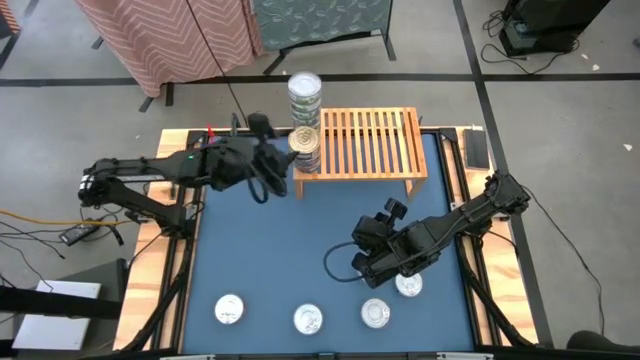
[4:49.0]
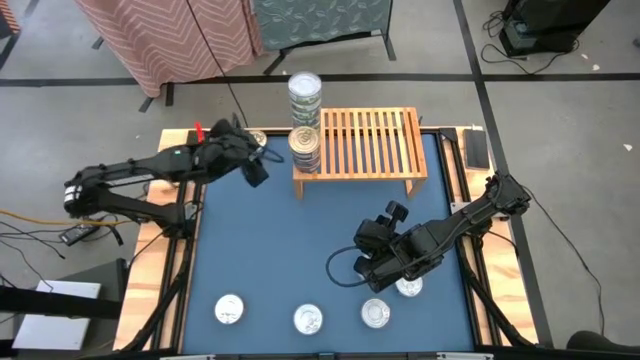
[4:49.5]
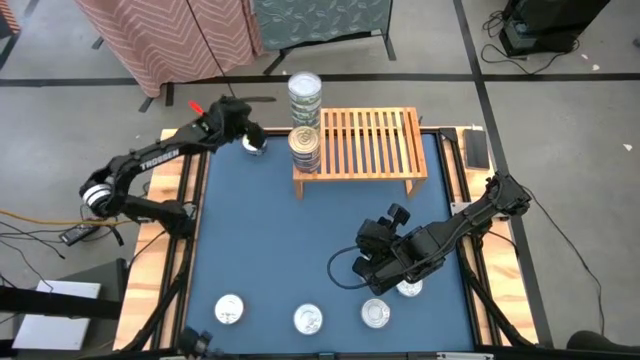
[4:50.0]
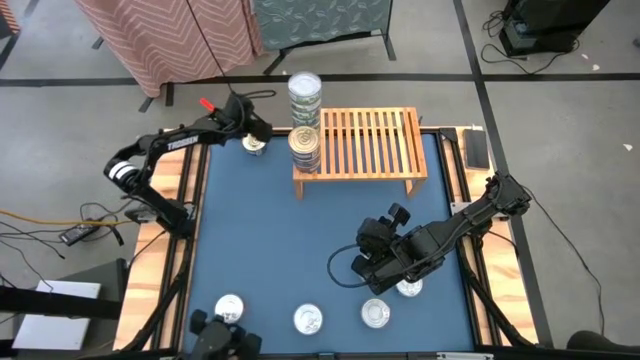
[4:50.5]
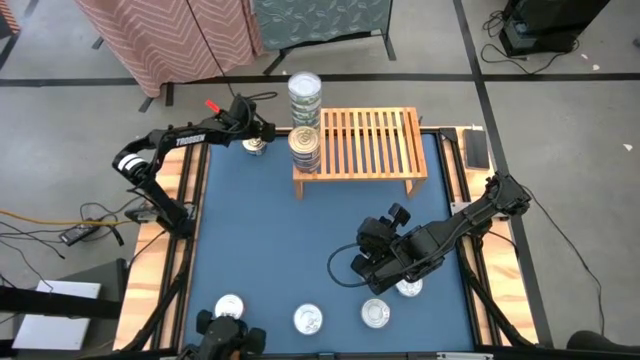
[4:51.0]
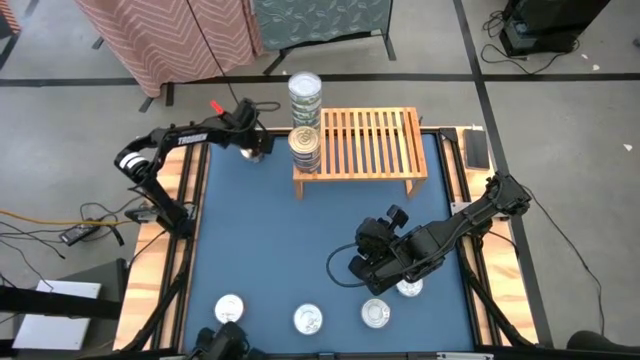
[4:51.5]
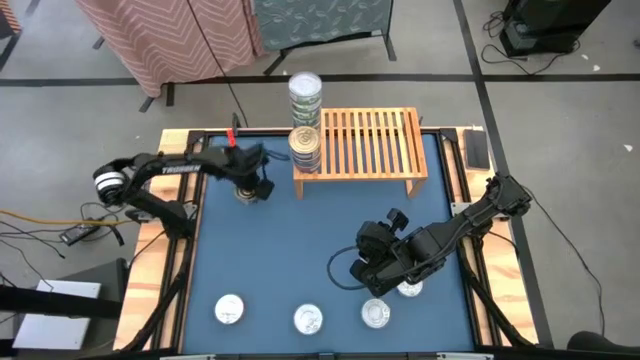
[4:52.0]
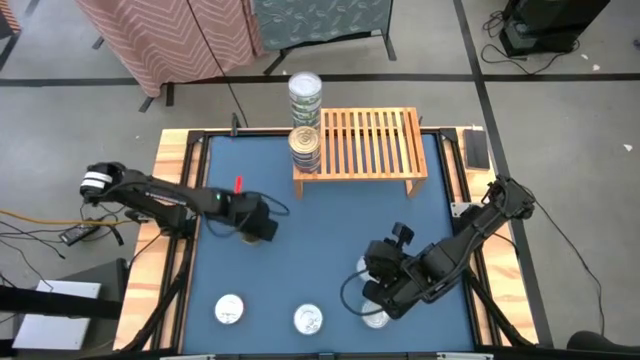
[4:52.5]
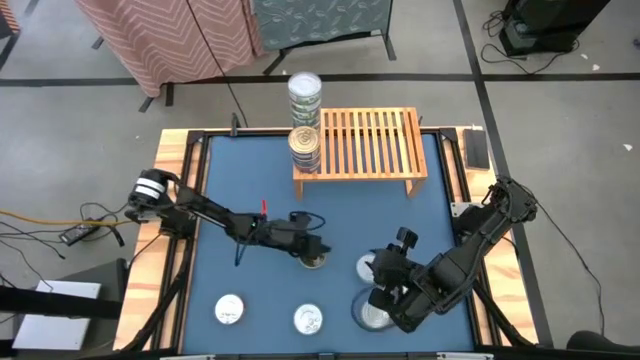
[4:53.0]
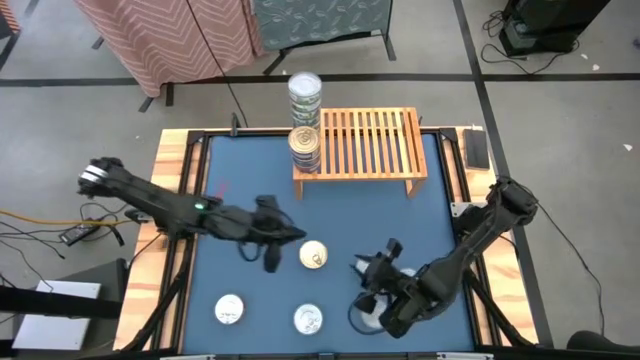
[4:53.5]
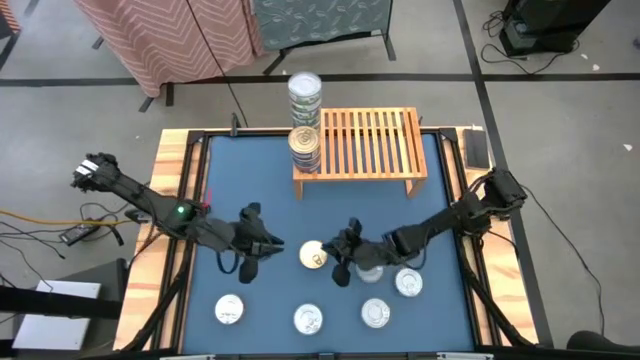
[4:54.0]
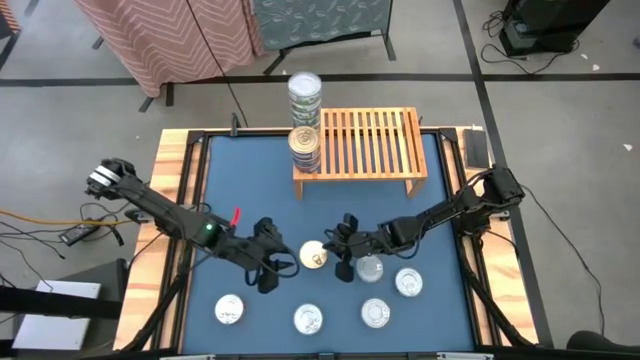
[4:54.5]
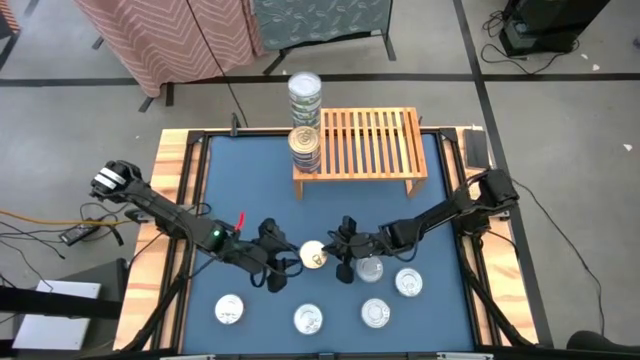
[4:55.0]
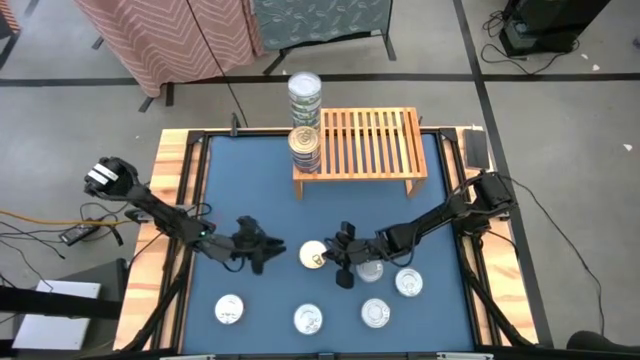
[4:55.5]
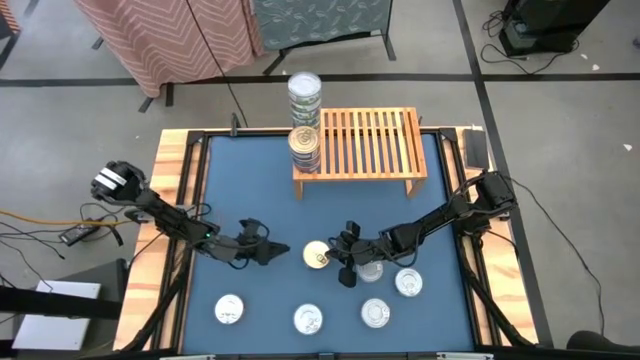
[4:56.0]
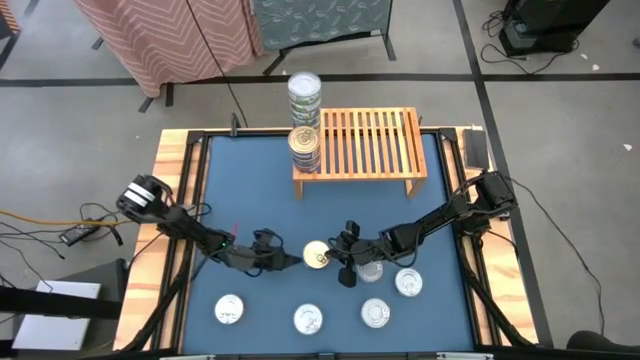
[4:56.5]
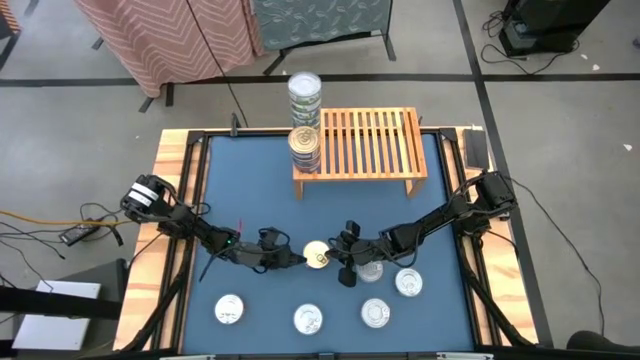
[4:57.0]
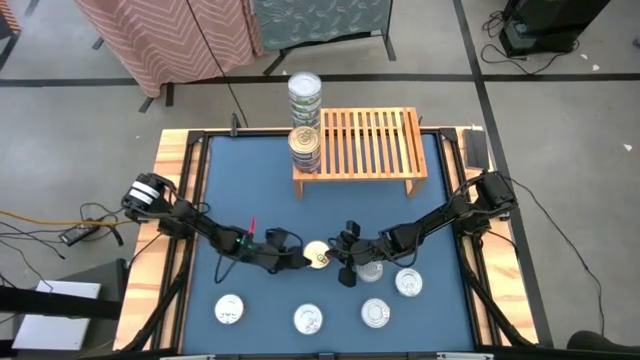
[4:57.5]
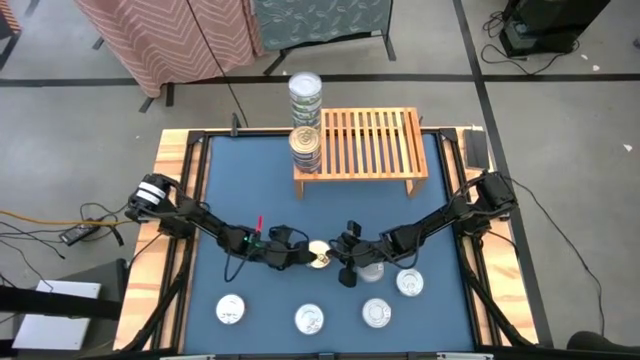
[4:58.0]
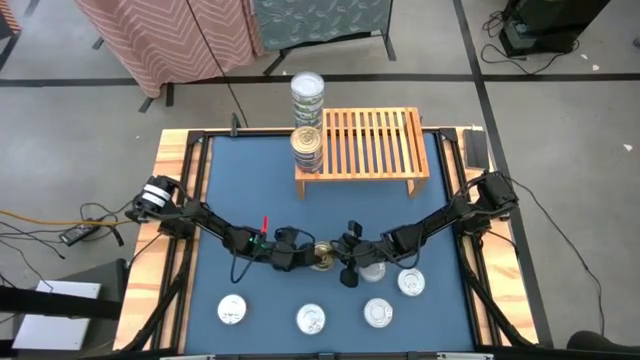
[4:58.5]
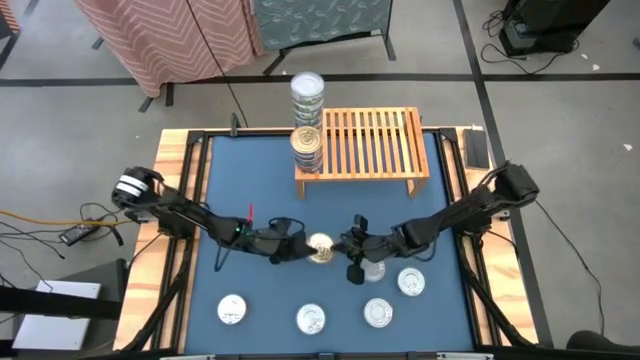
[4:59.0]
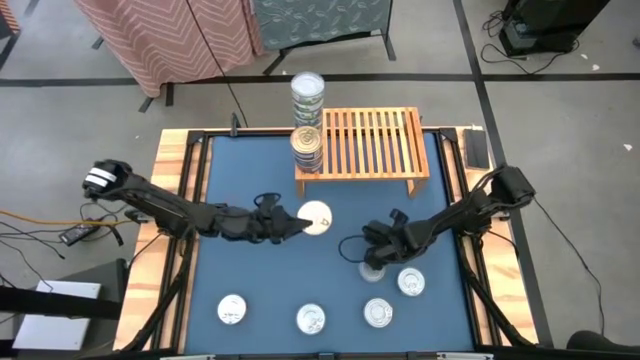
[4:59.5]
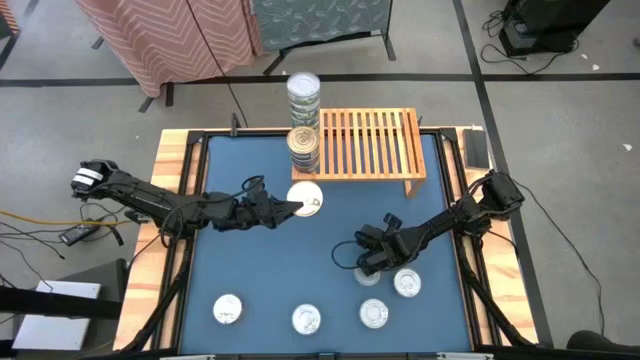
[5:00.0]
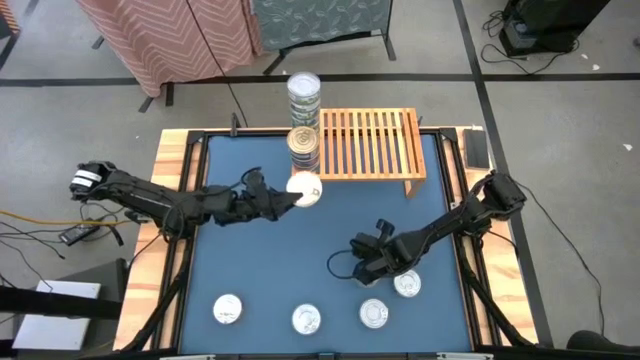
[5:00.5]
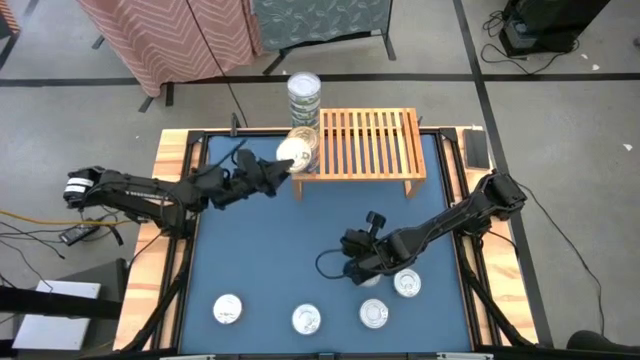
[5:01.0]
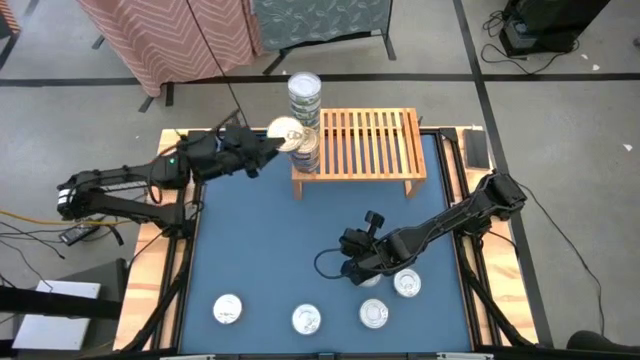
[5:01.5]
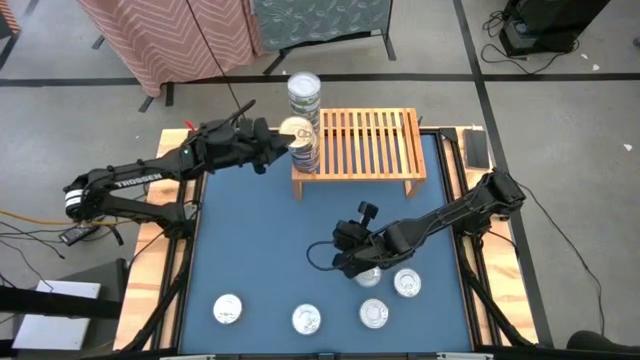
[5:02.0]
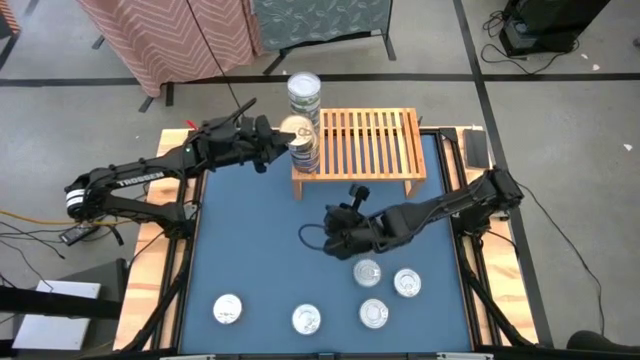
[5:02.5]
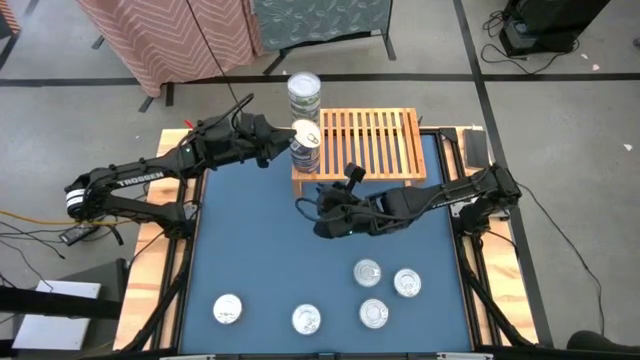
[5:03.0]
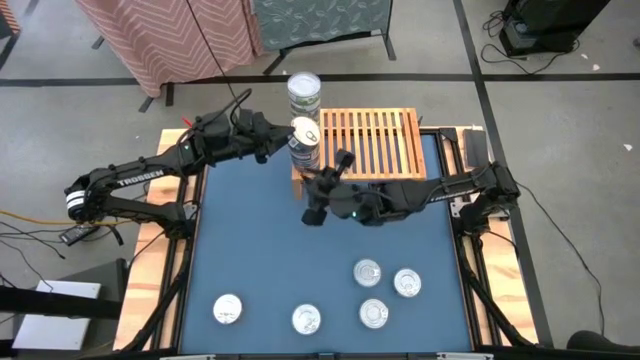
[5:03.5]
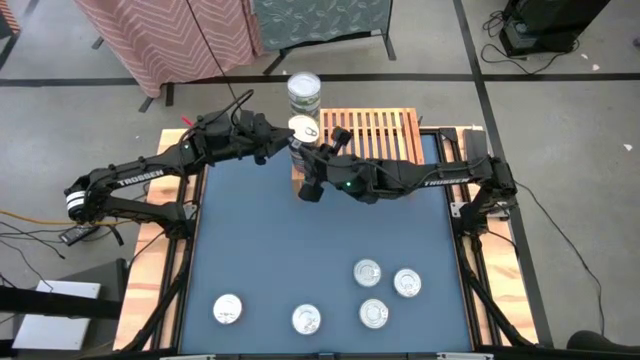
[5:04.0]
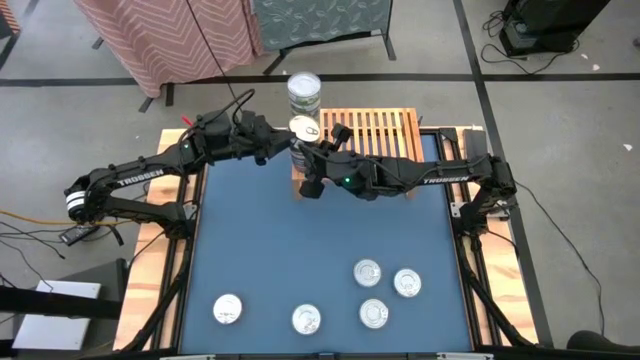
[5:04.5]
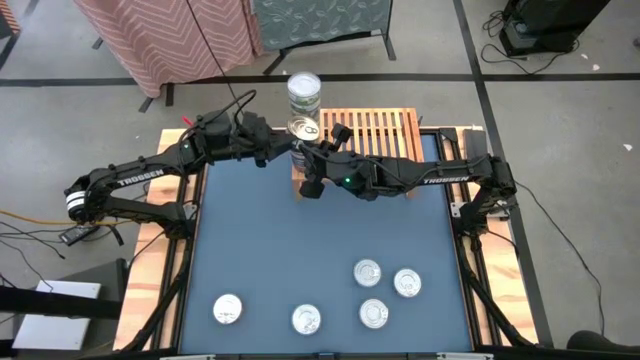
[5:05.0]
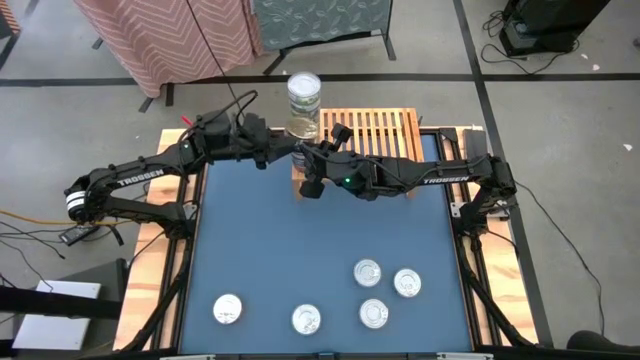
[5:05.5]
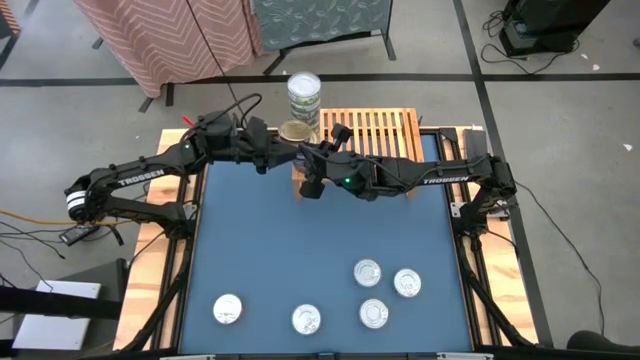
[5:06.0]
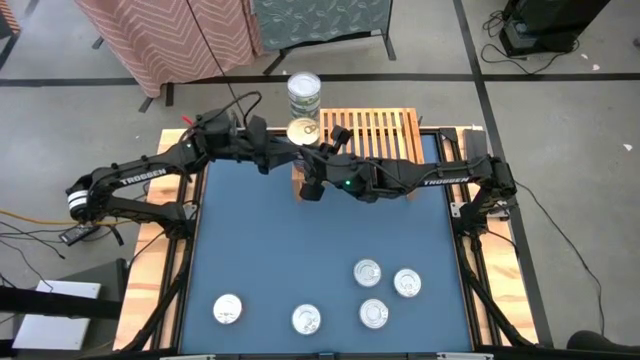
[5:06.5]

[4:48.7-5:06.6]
Task: Stack canned seafood by type on shelf
Stack the blue tuna can on top of the other blue tuna cans on the shelf

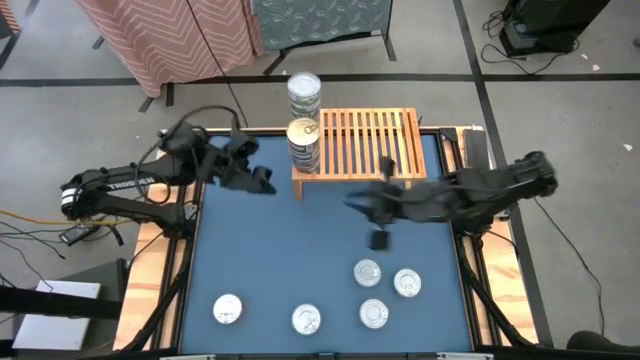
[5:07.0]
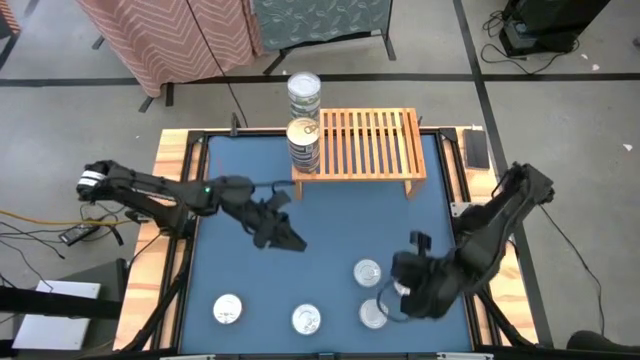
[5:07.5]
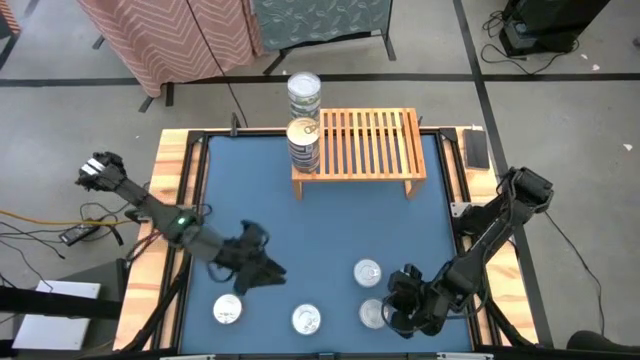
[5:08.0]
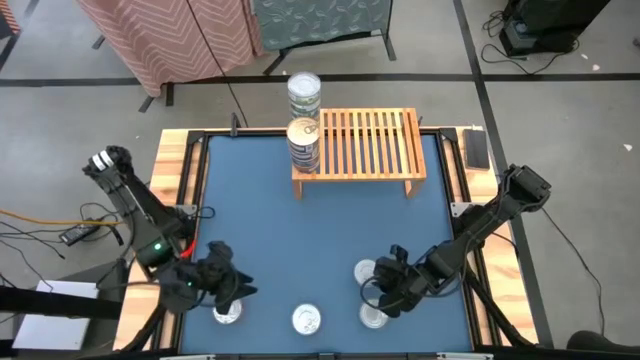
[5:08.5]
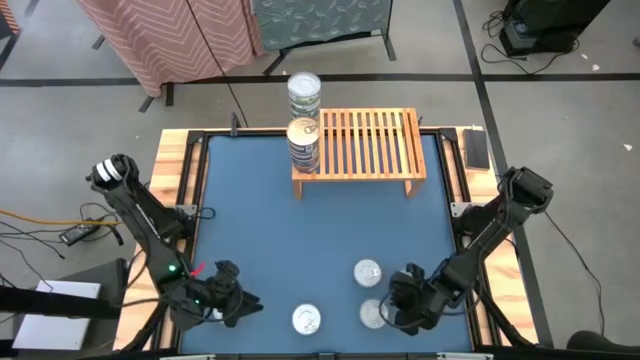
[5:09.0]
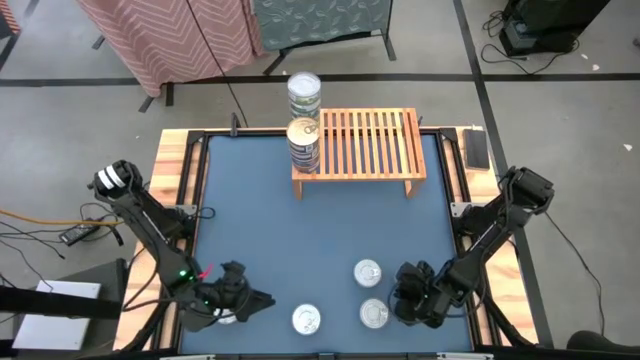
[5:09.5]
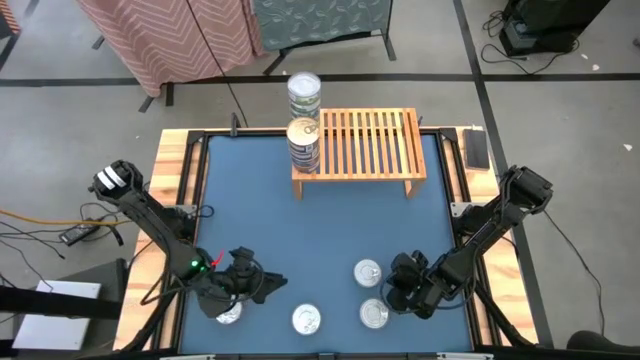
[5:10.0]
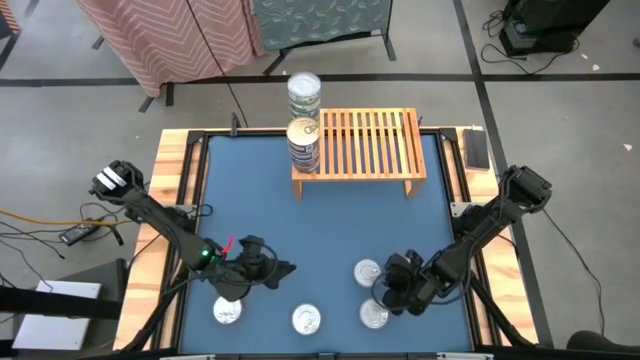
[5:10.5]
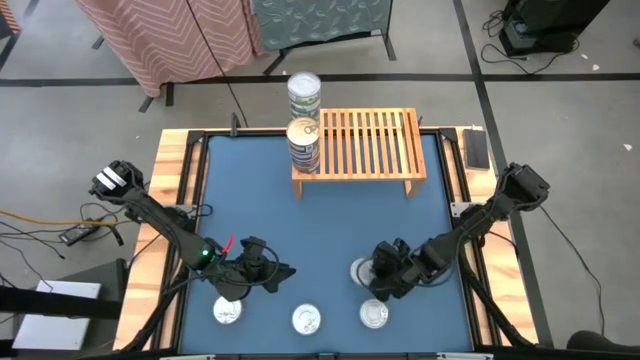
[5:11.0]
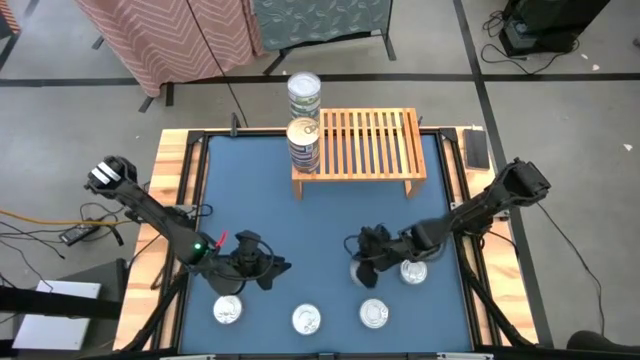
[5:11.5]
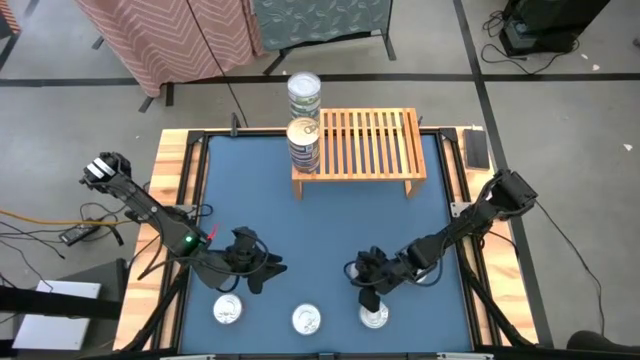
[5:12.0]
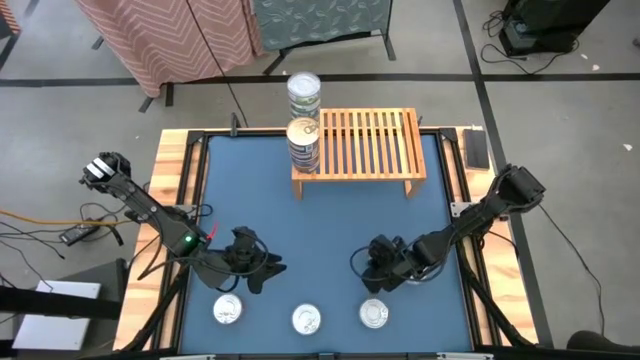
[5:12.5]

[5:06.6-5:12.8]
Adjust the dark green tuna can on the table
